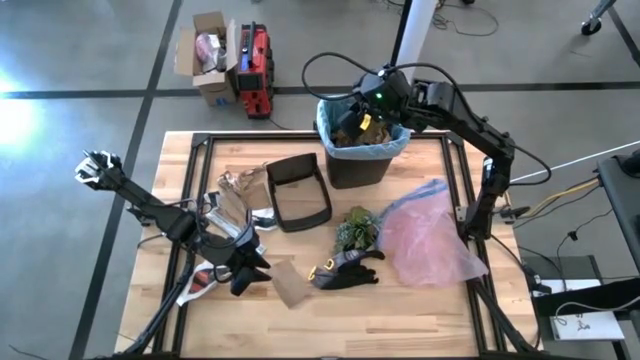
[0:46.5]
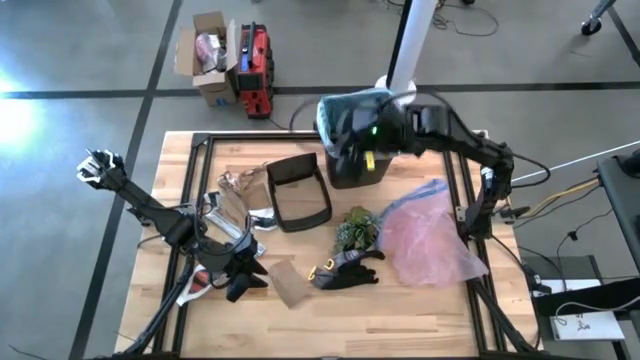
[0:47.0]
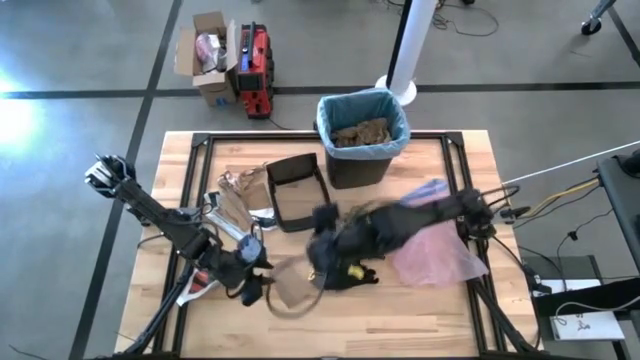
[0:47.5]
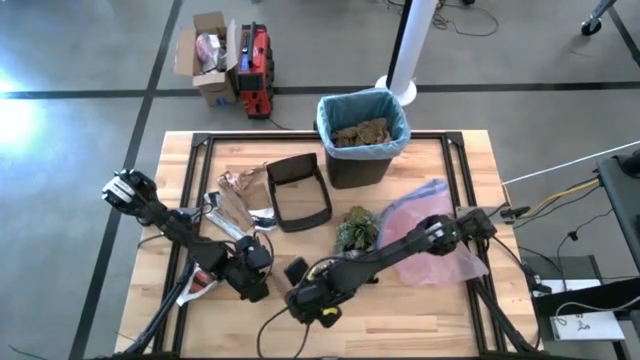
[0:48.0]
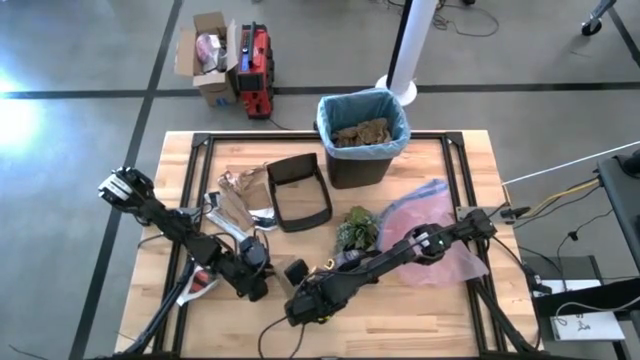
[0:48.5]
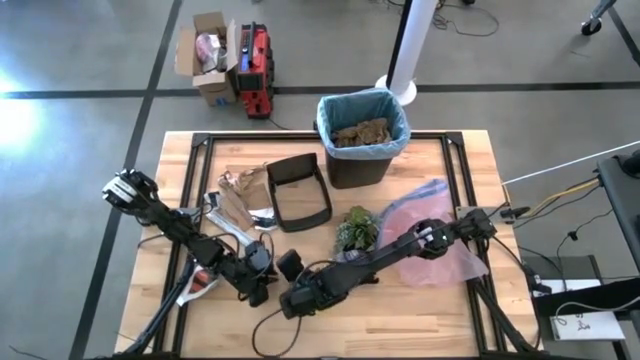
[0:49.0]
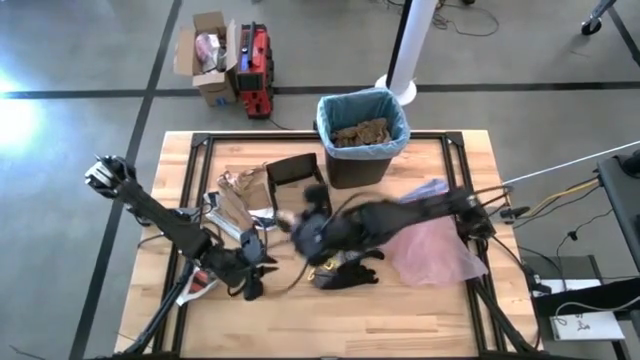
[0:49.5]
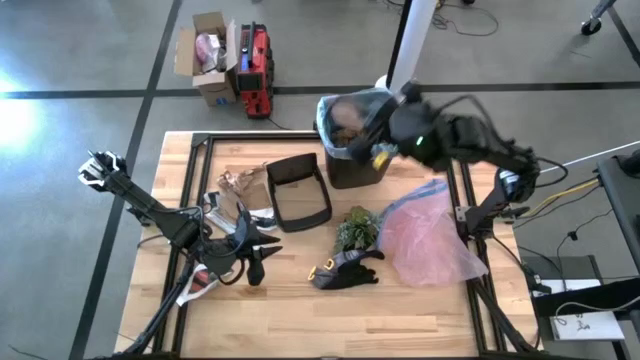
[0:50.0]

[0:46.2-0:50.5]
Task: place trash/remove bag and relplace
Put the brown cardboard into the trash bin

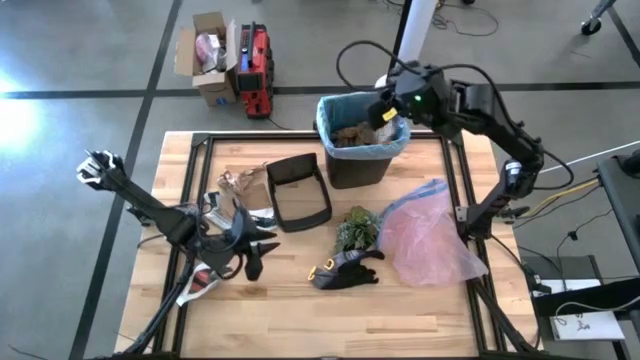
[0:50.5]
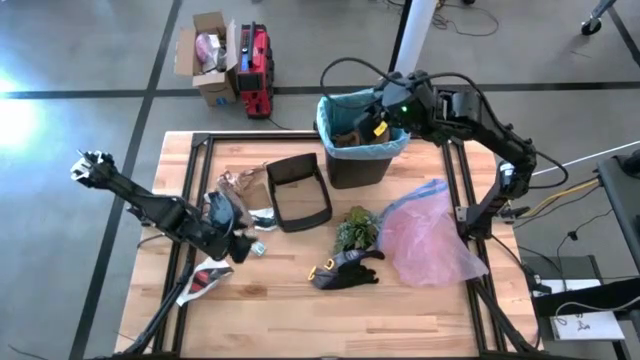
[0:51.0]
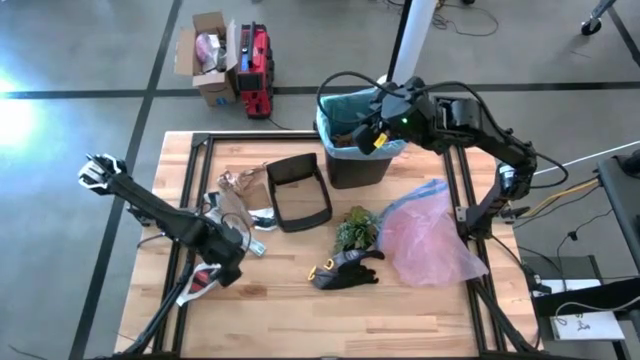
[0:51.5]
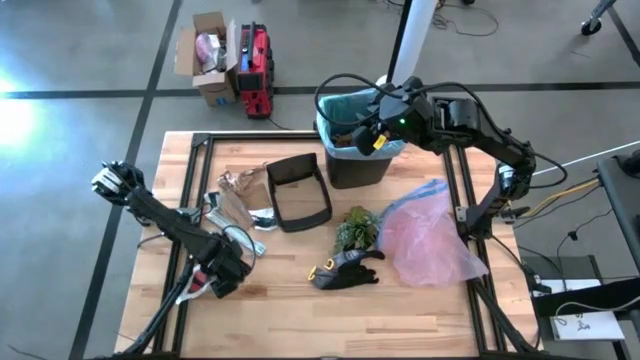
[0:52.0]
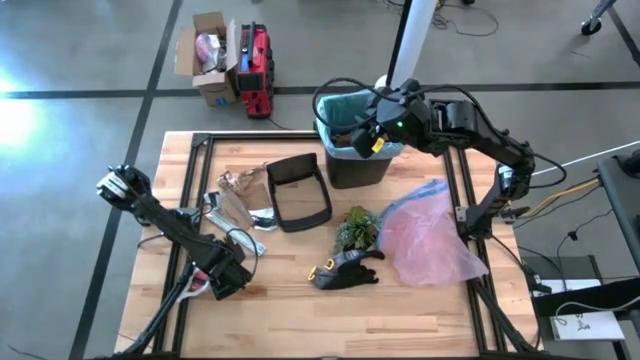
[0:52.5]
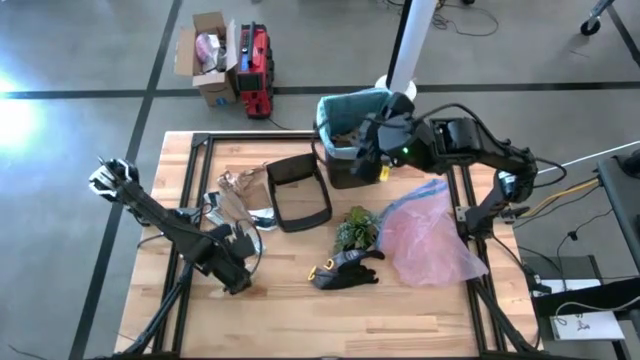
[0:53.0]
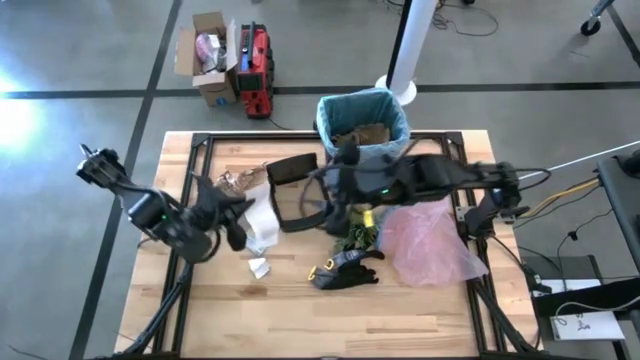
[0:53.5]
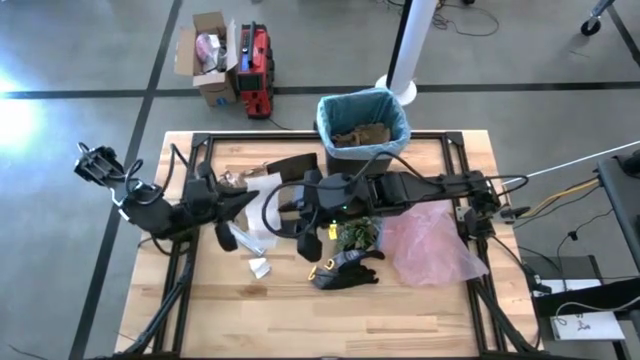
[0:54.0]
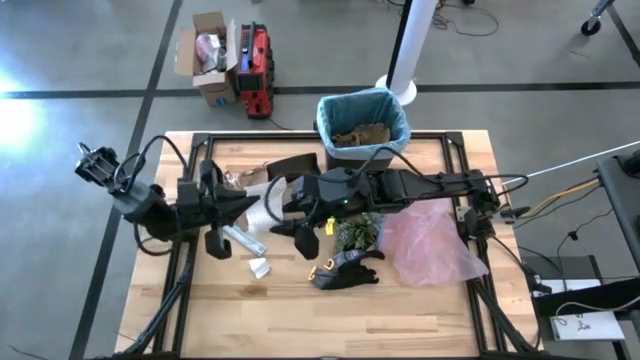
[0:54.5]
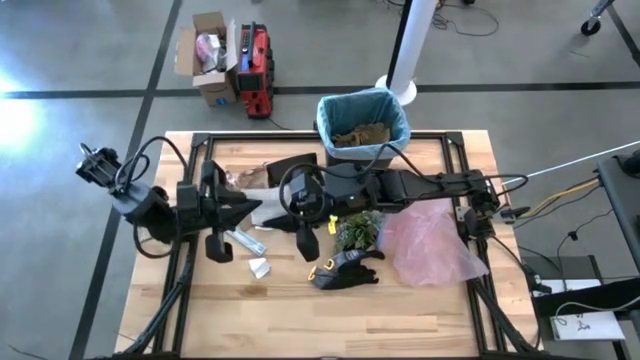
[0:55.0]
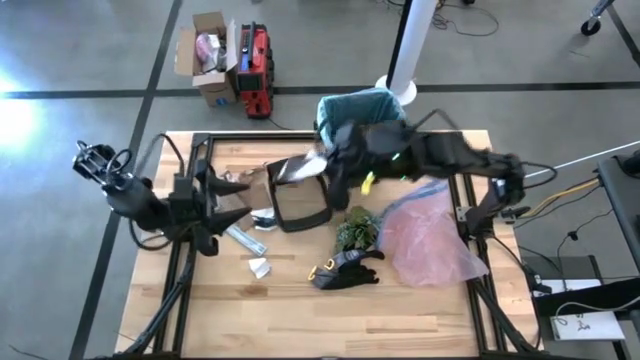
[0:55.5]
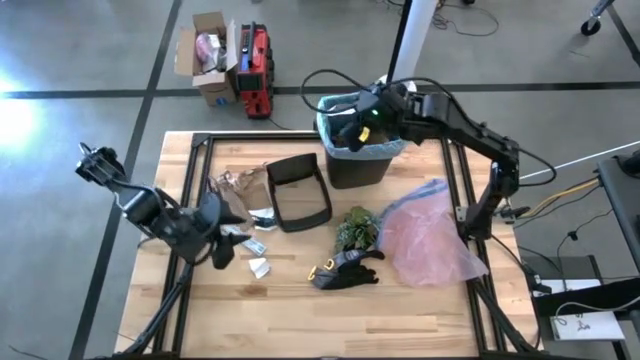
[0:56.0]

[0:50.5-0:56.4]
Put the white paper into the trash bin

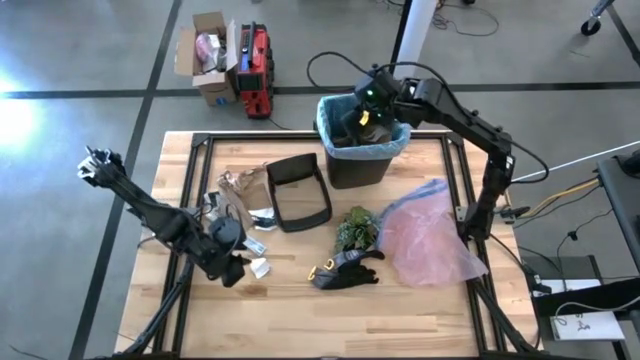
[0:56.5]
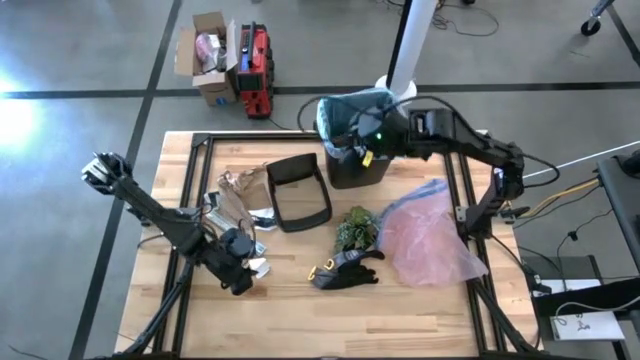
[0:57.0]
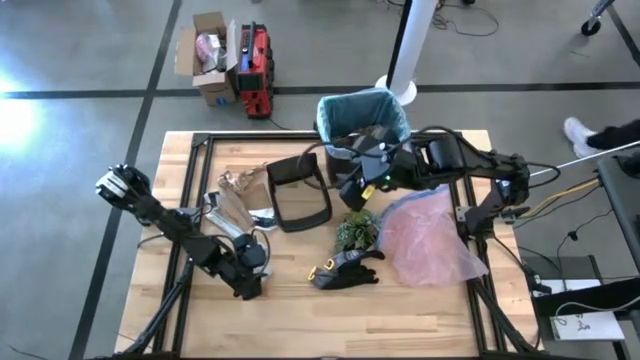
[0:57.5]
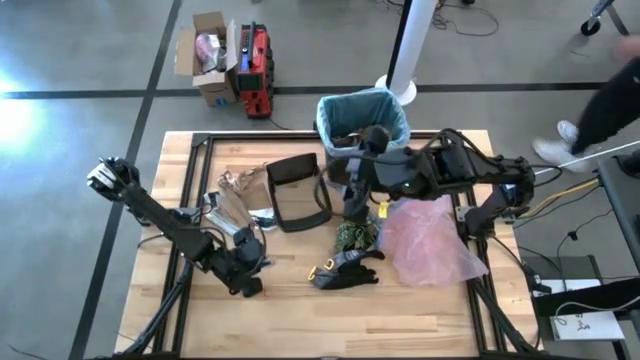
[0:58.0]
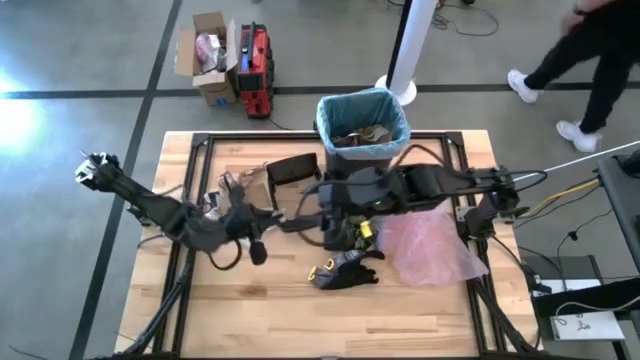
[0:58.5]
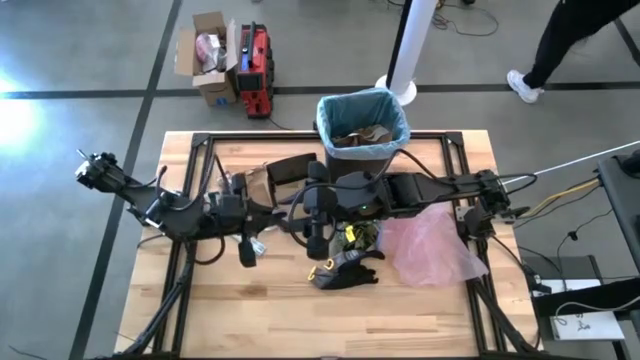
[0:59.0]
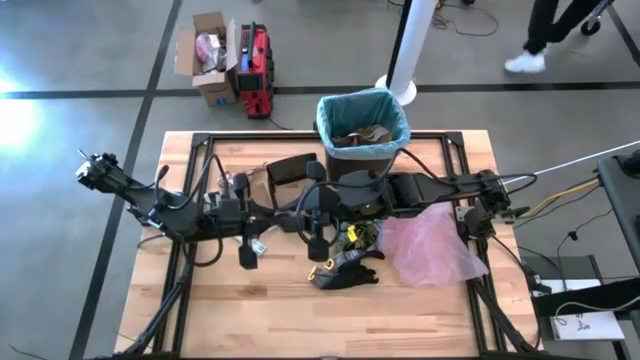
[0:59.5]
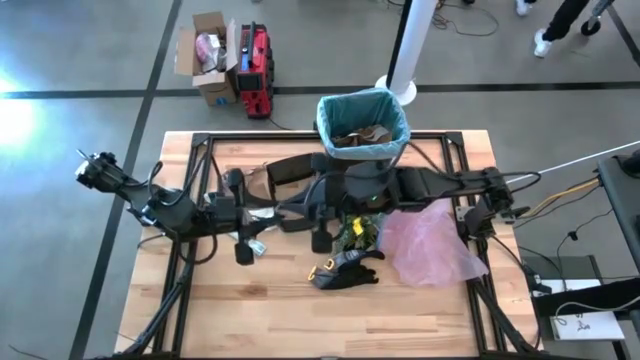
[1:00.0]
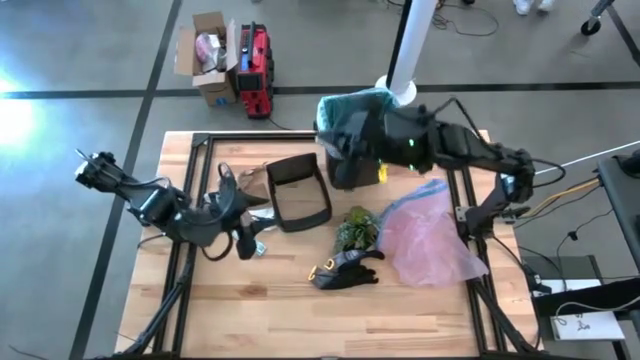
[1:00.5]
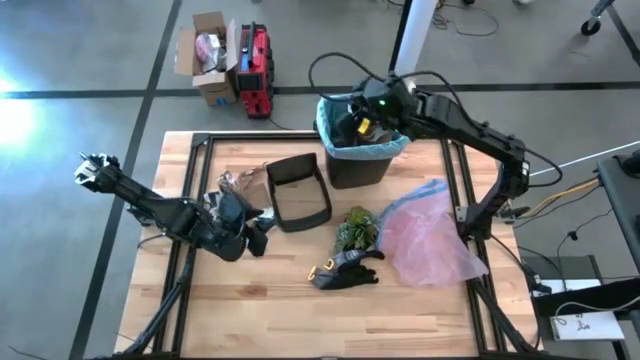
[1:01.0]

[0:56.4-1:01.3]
Put the white paper into the trash bin

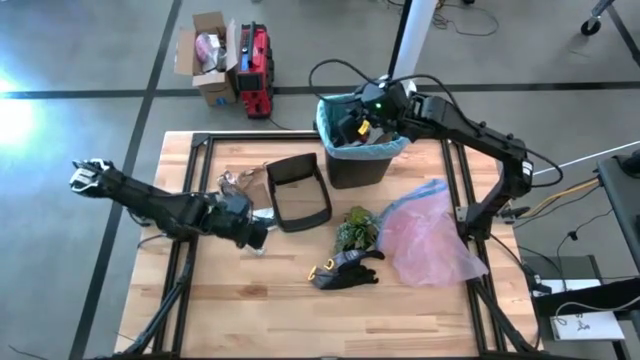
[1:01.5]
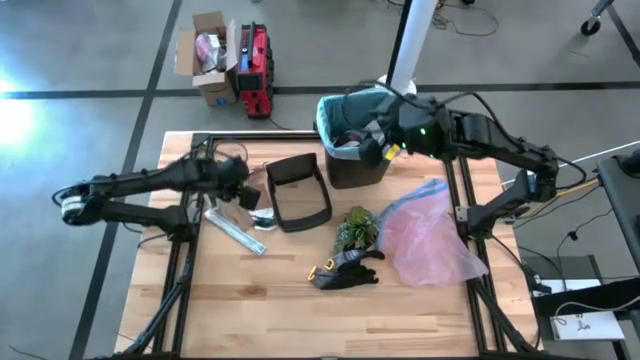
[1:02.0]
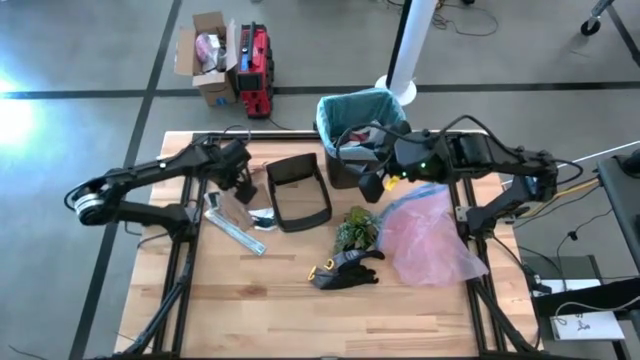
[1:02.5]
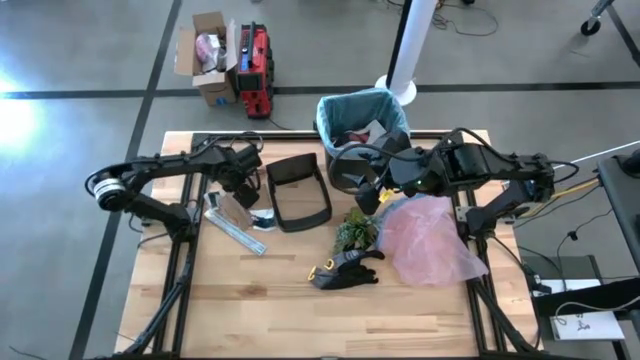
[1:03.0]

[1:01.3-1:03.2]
Put the brown napkin into the trash bin

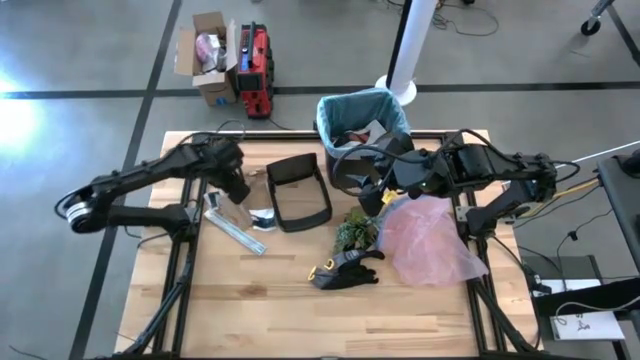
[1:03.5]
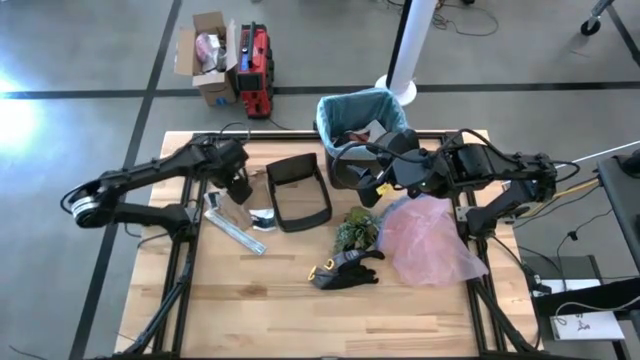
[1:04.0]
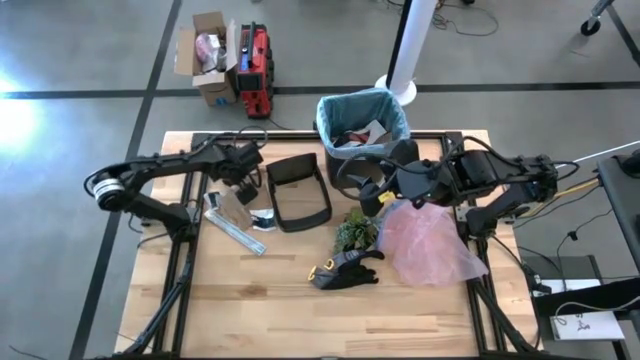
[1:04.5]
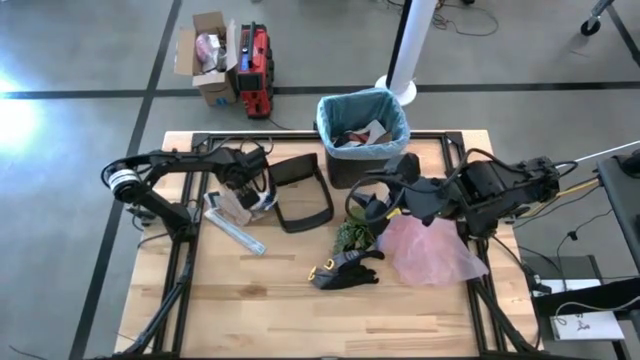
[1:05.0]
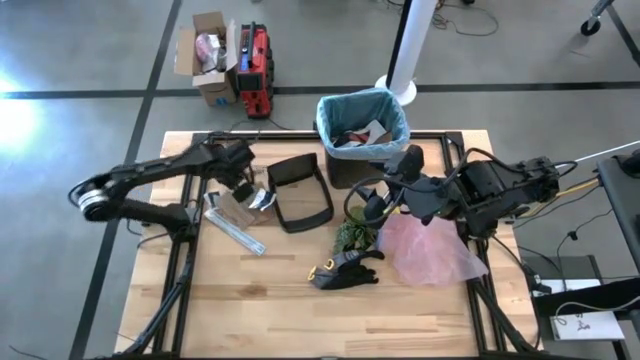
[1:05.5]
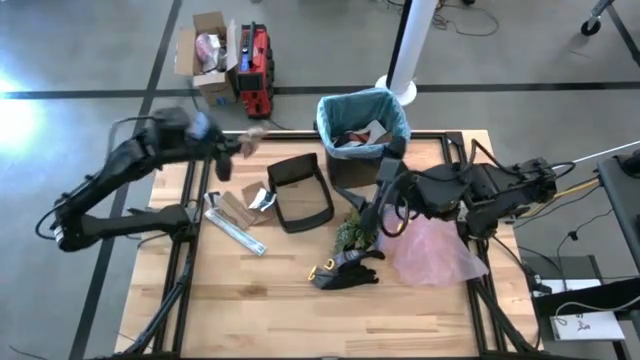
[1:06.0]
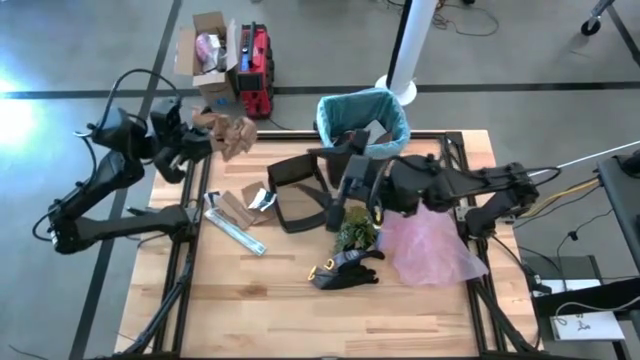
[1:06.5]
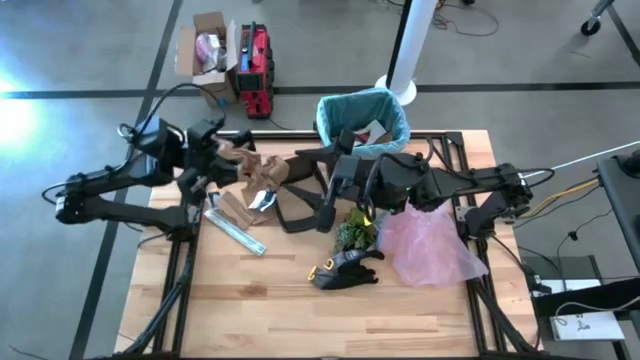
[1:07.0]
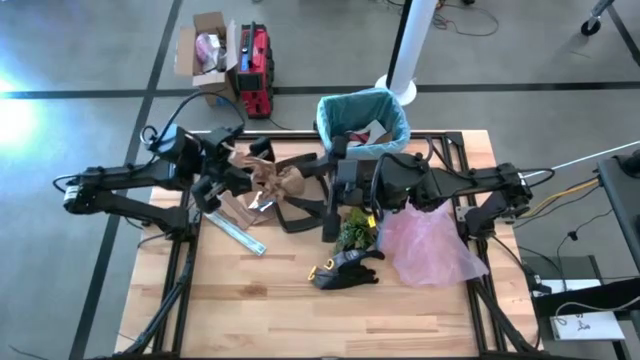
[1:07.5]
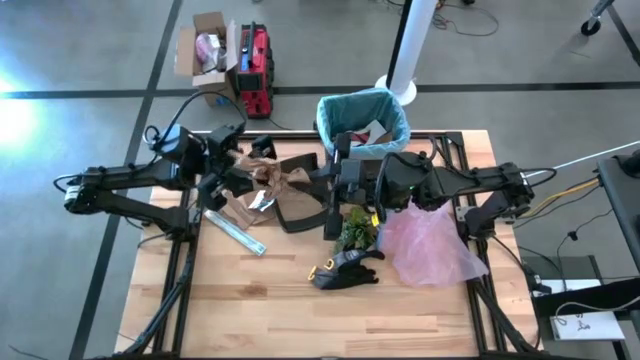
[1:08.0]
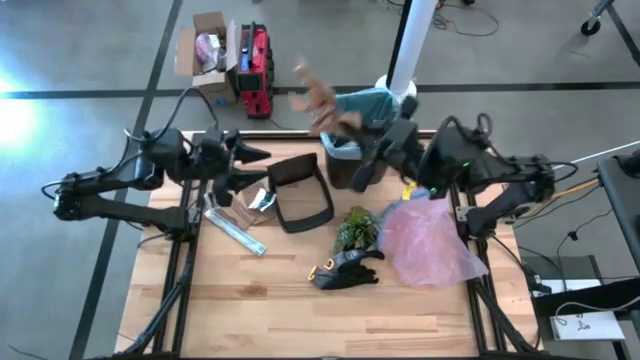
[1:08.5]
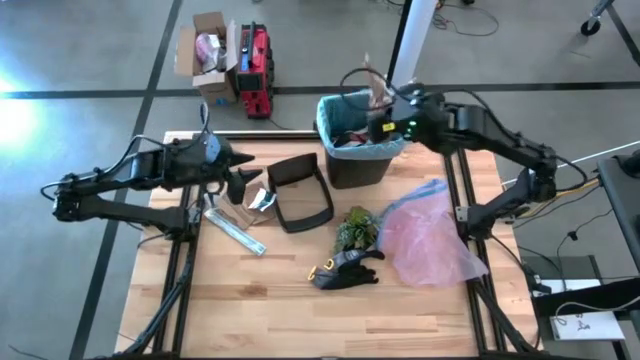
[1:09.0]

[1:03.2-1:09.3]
Put the brown napkin into the trash bin
